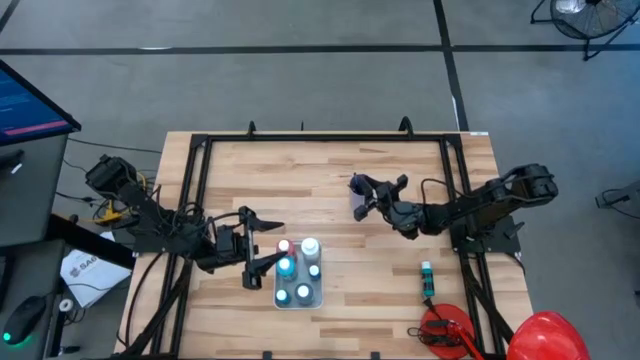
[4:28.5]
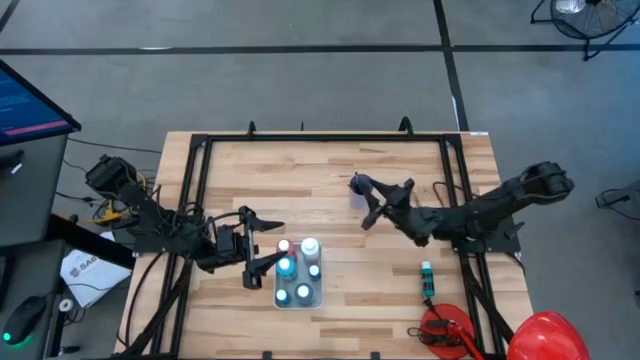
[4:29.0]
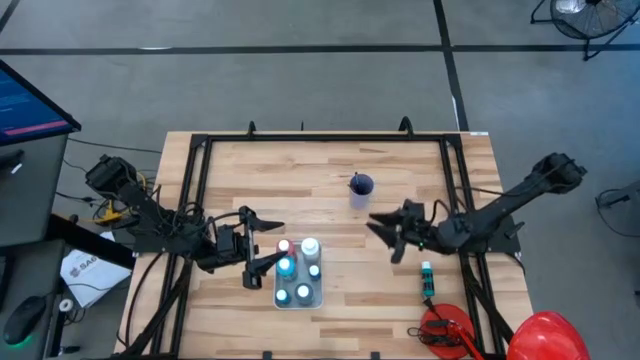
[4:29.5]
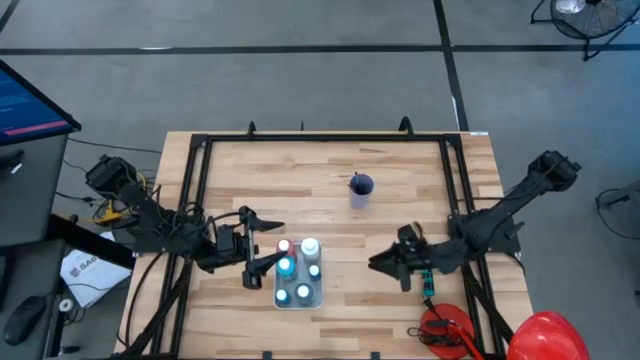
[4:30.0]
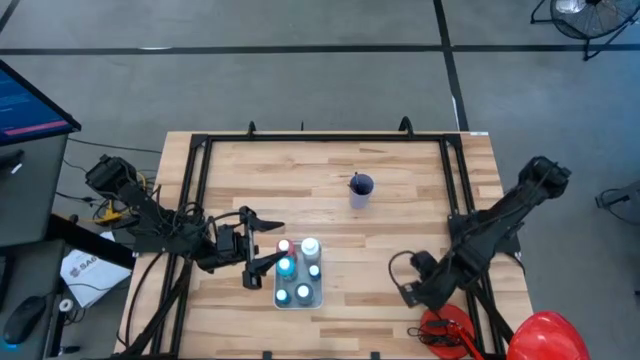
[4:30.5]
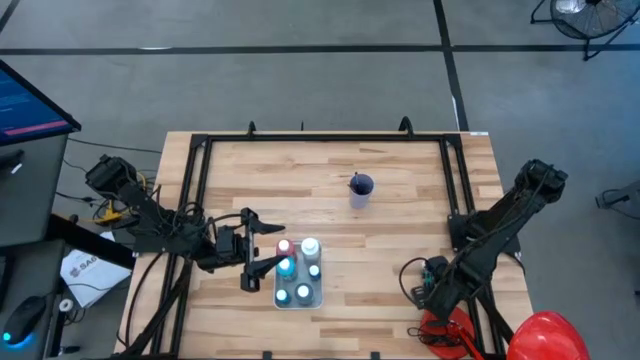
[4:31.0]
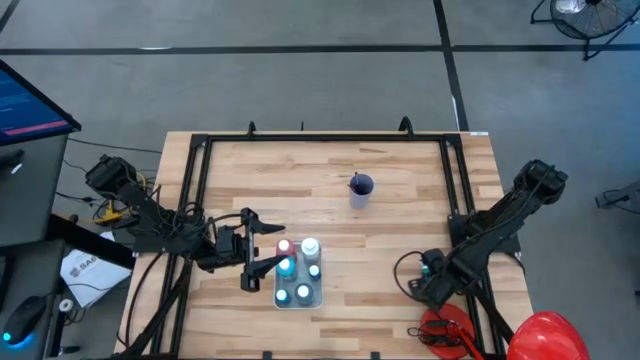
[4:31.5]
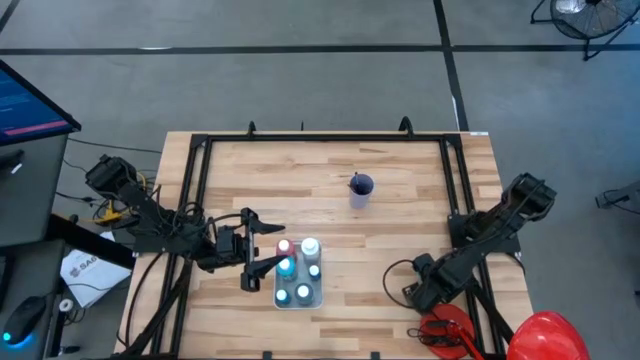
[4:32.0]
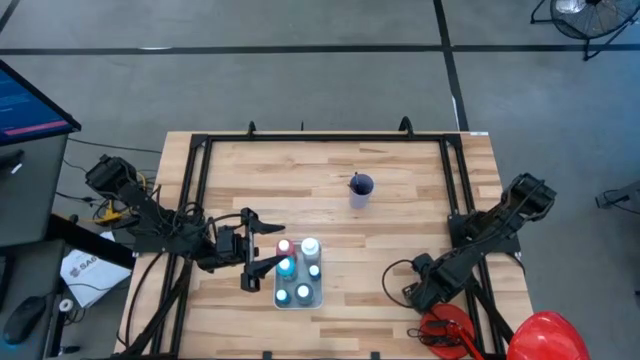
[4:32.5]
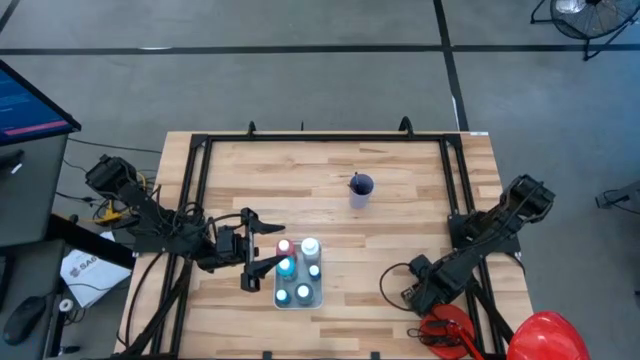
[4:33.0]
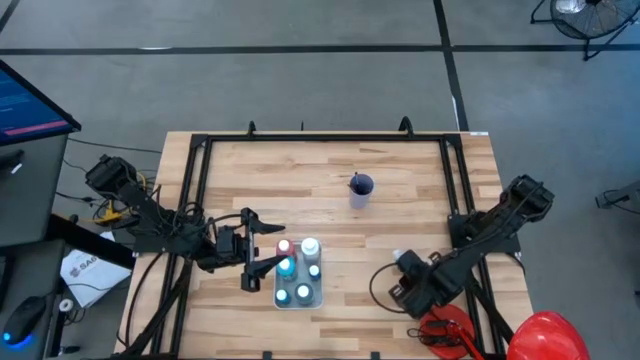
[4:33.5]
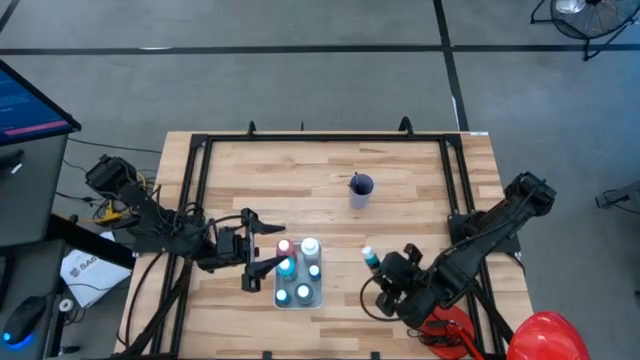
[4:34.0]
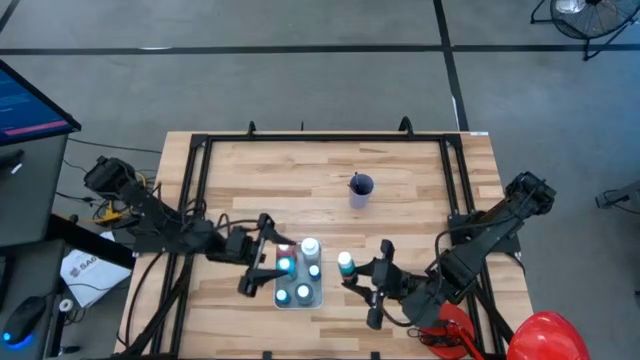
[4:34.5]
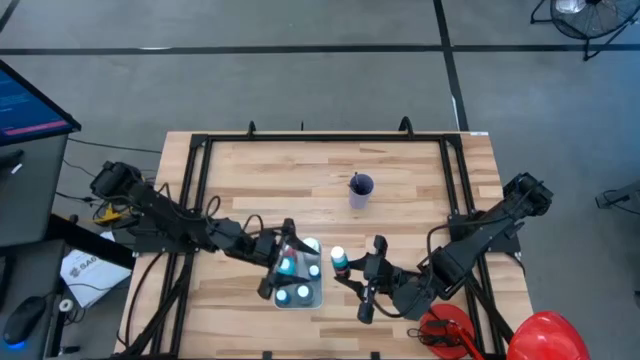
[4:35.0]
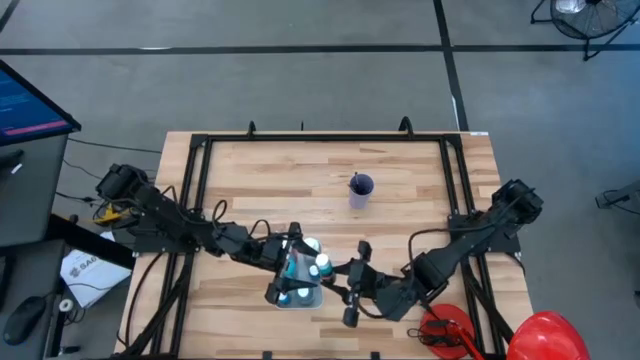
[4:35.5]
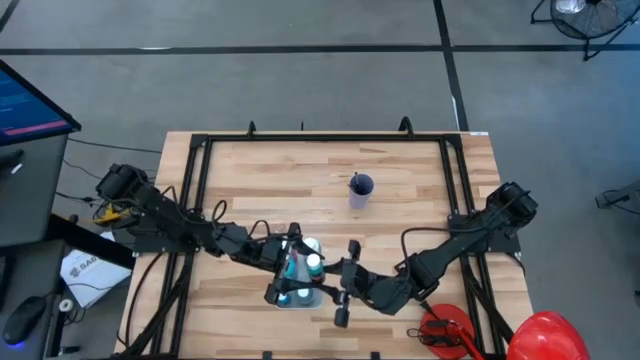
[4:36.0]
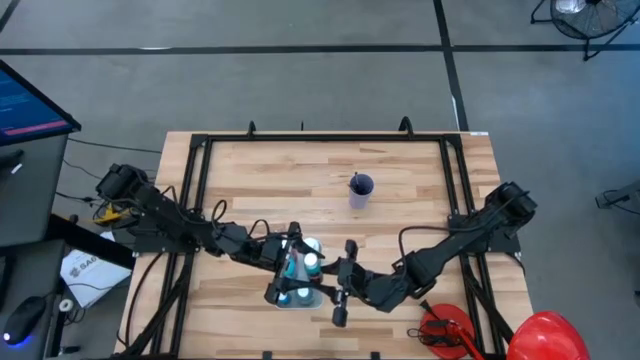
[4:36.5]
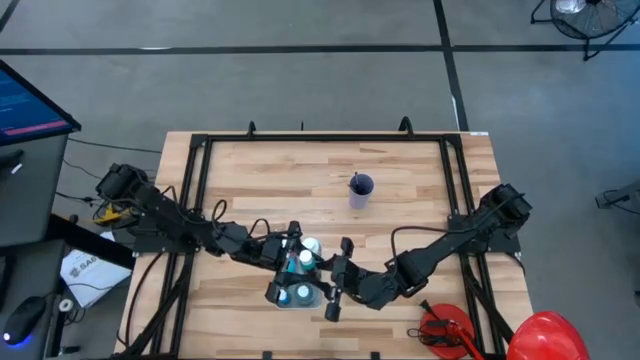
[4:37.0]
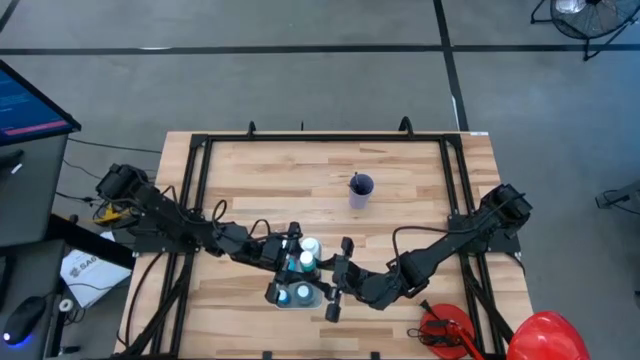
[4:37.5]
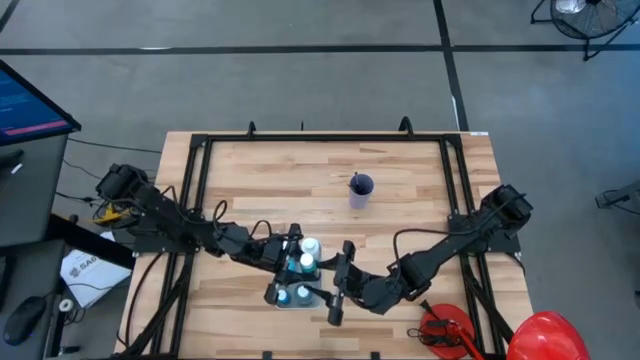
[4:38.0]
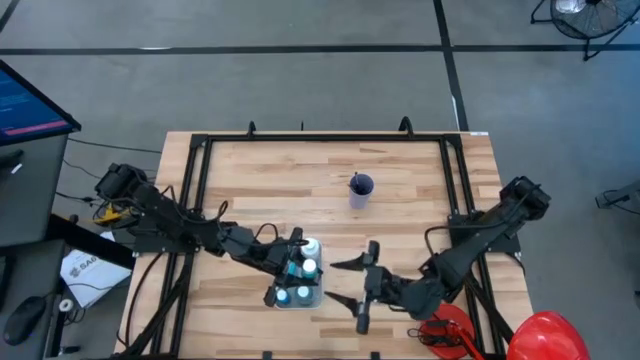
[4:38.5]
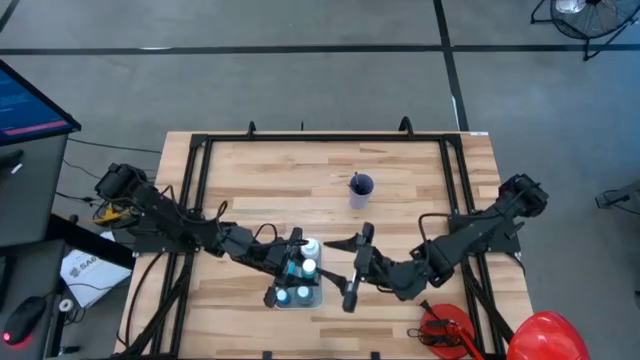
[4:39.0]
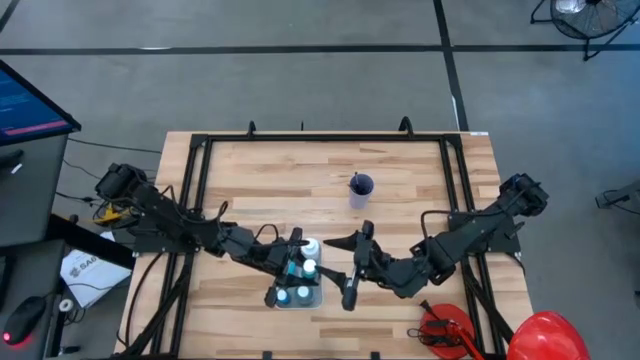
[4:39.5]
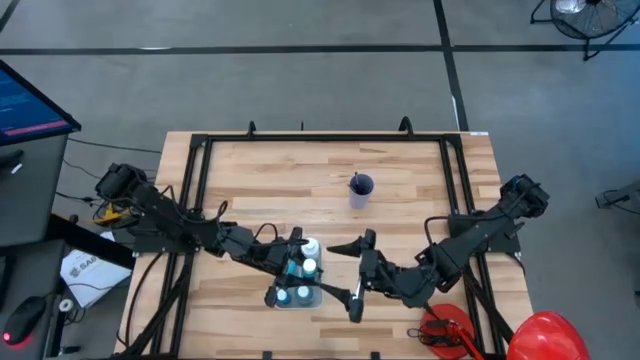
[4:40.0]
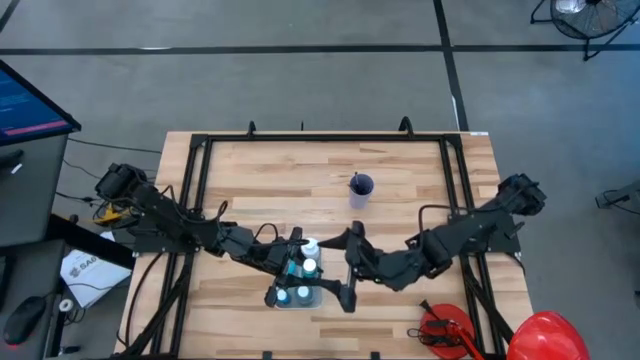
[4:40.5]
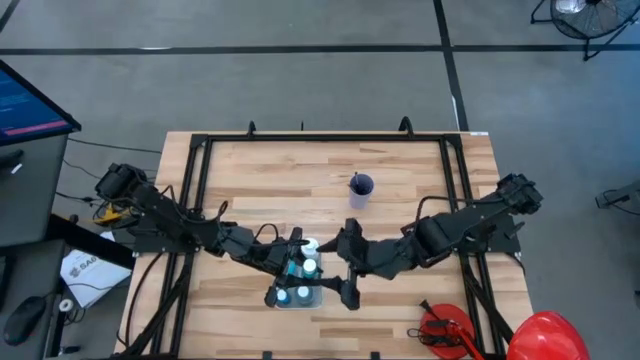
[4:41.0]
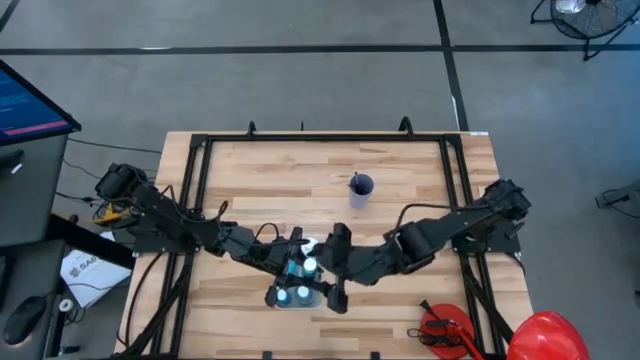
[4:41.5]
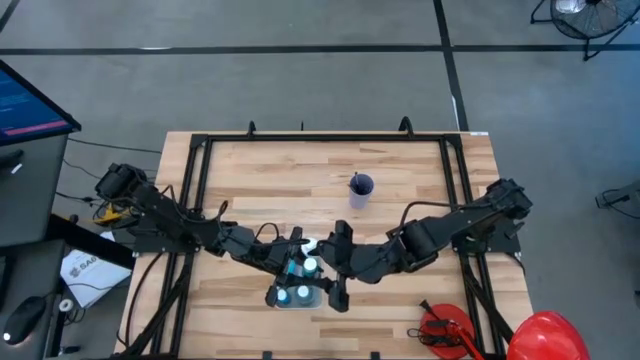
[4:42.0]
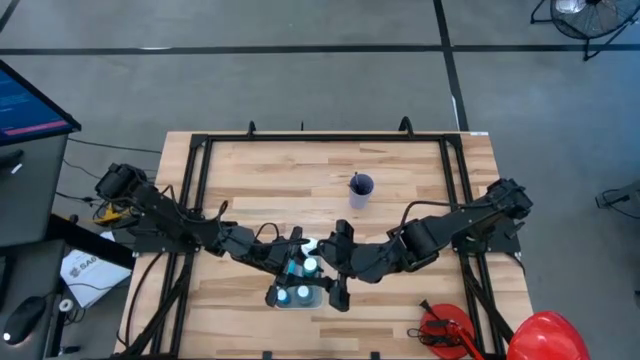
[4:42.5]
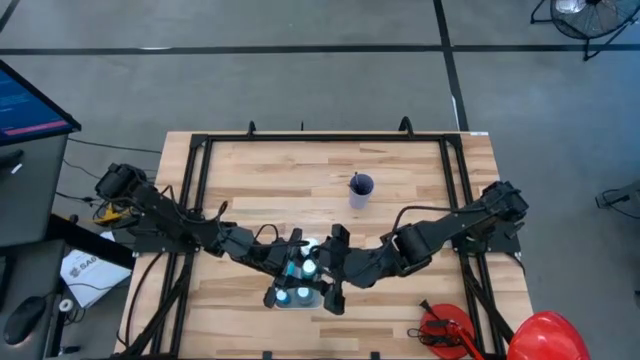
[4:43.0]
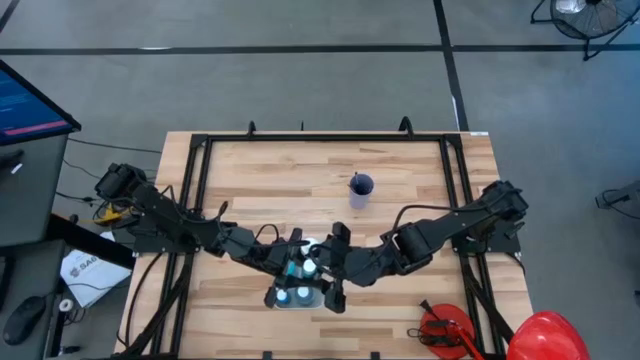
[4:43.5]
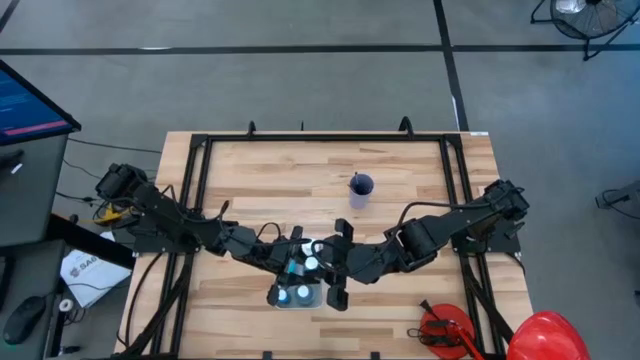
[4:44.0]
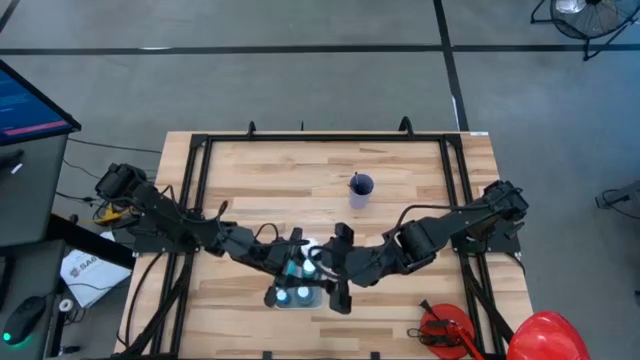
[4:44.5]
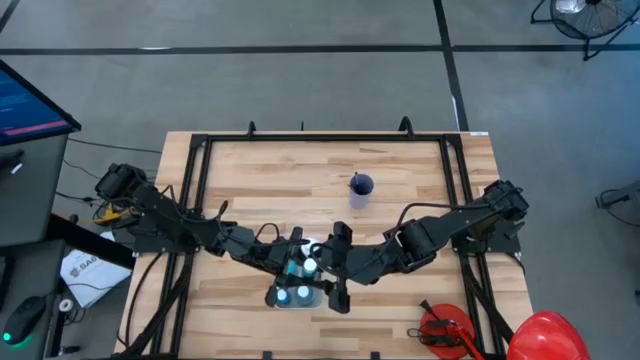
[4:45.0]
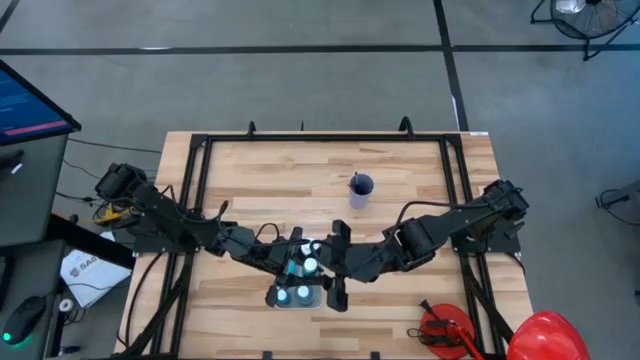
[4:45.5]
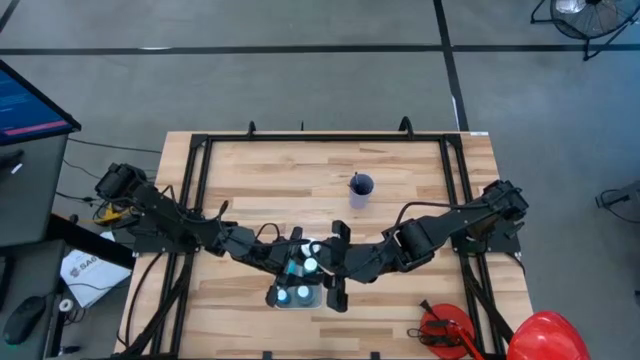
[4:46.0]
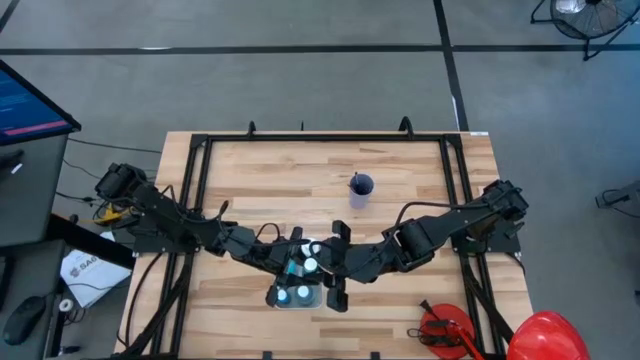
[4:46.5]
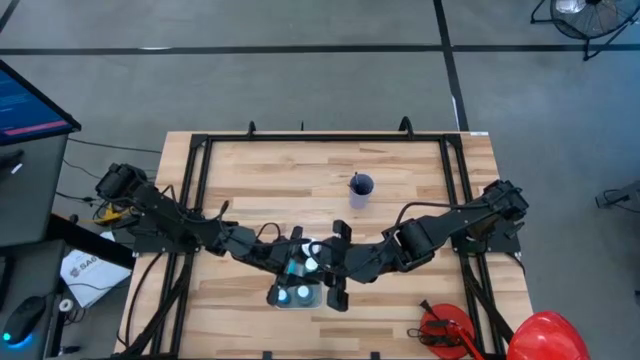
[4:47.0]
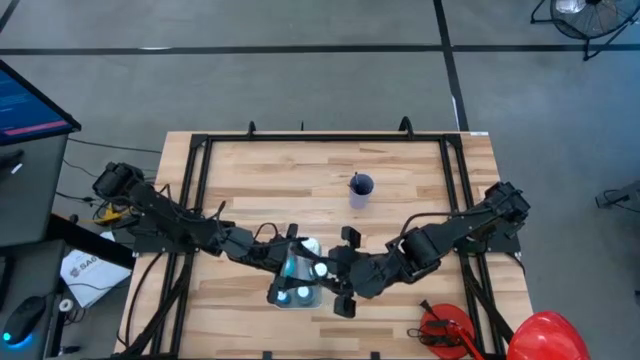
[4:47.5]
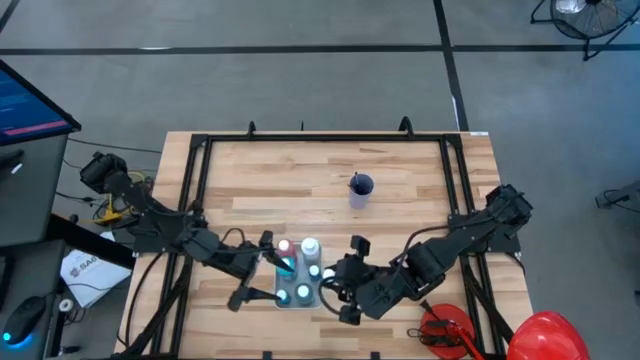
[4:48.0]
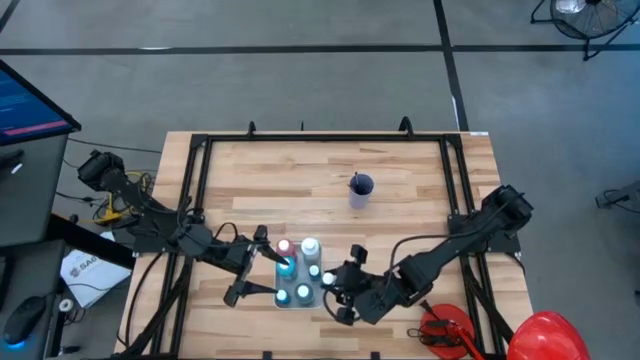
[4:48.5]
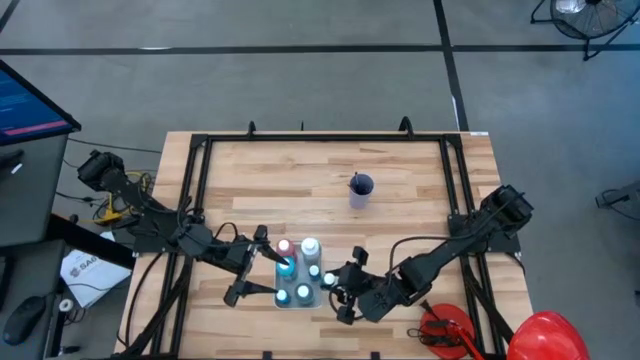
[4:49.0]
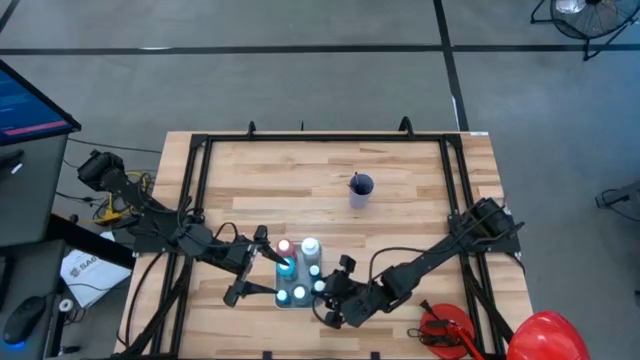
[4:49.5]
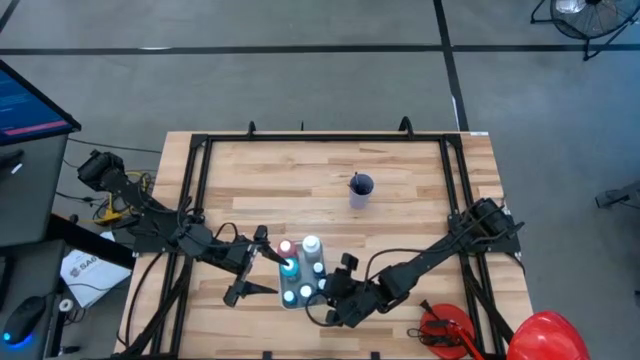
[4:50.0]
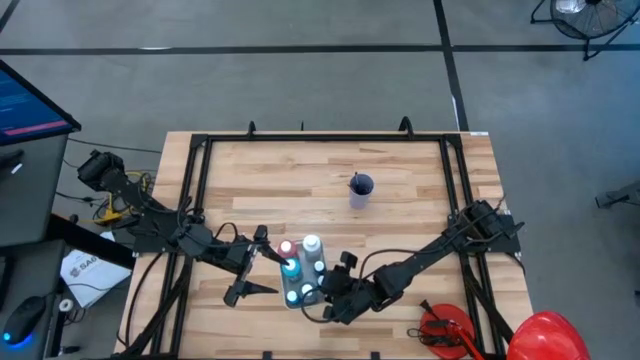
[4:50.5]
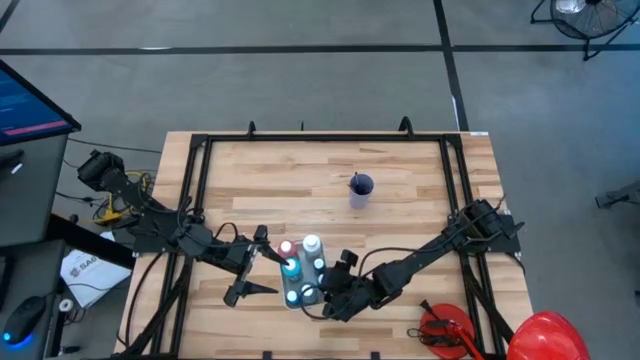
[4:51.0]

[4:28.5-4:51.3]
Task: Pick & Place Paint Supplies
Put the black and green paint bottle into the white bin
